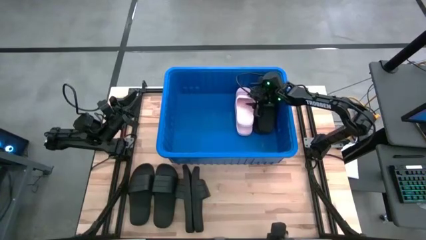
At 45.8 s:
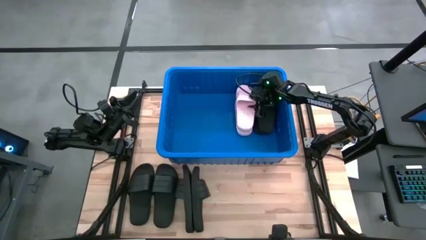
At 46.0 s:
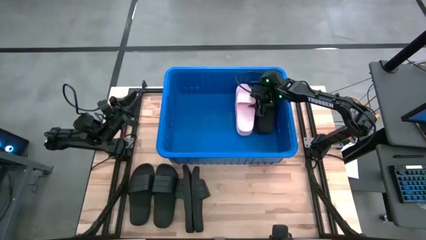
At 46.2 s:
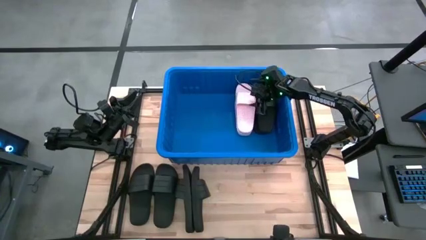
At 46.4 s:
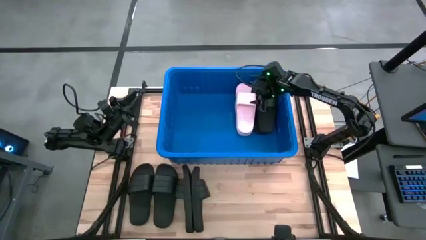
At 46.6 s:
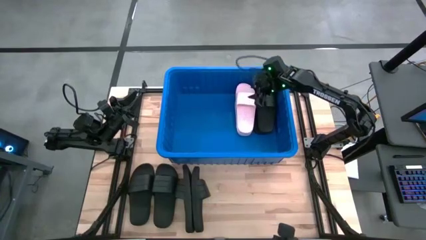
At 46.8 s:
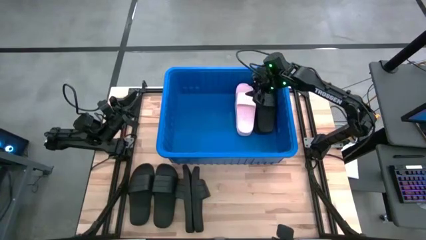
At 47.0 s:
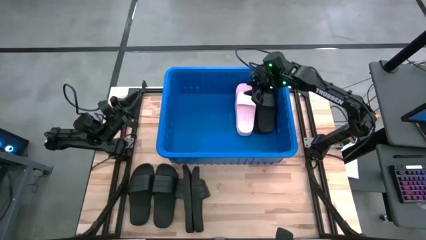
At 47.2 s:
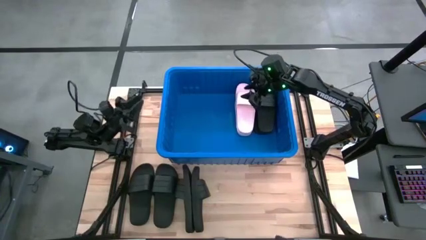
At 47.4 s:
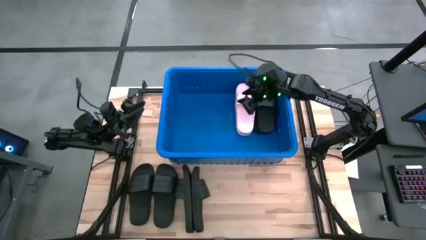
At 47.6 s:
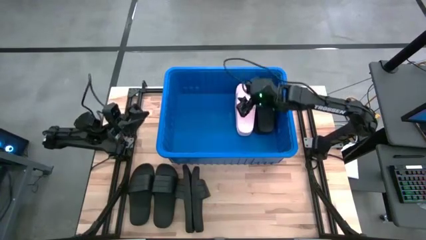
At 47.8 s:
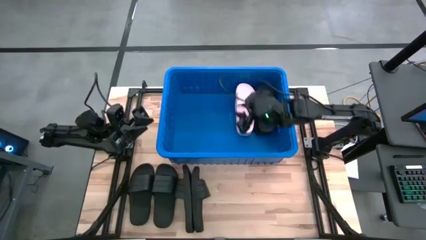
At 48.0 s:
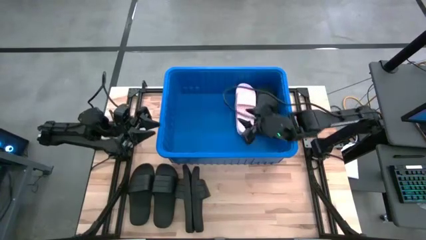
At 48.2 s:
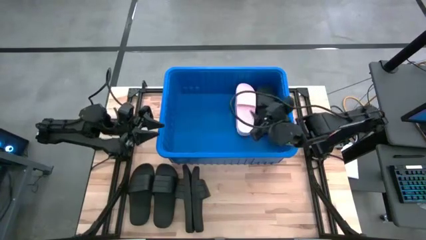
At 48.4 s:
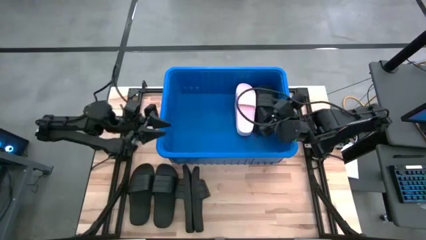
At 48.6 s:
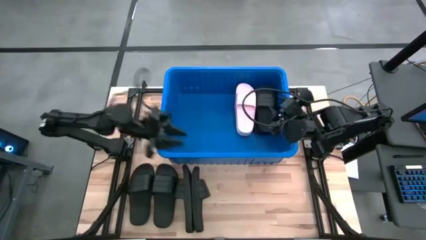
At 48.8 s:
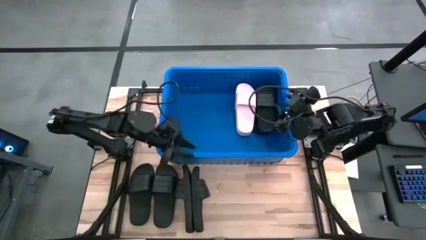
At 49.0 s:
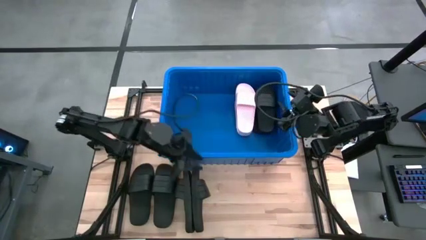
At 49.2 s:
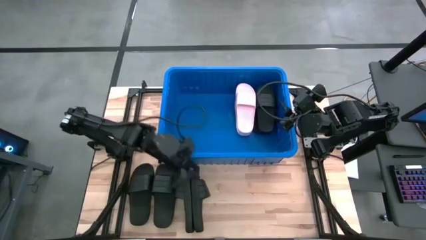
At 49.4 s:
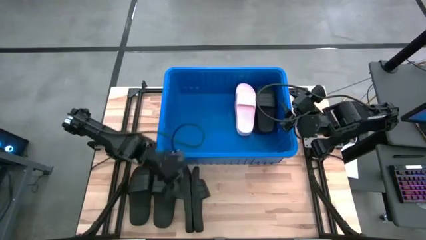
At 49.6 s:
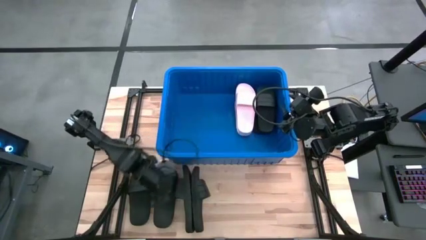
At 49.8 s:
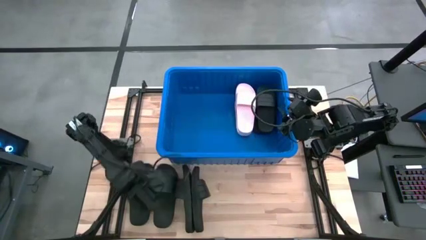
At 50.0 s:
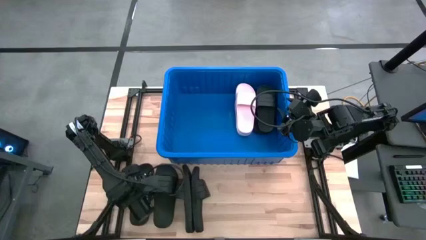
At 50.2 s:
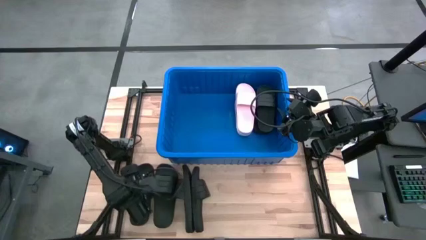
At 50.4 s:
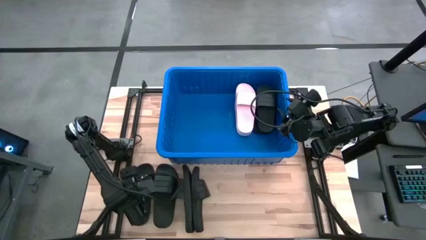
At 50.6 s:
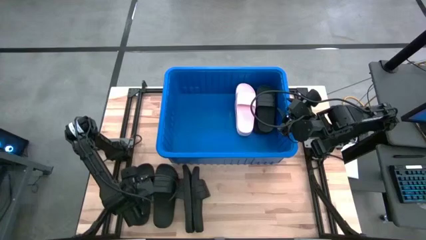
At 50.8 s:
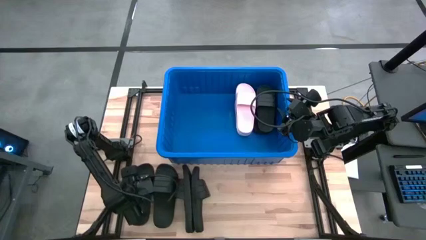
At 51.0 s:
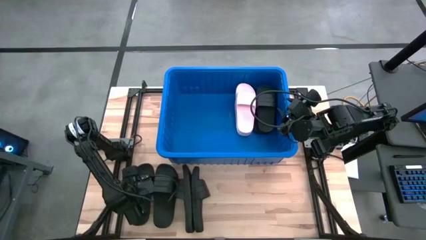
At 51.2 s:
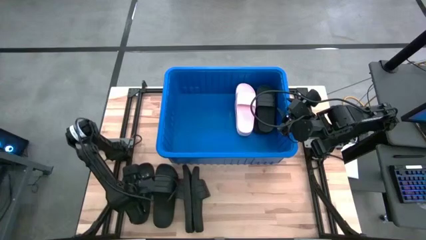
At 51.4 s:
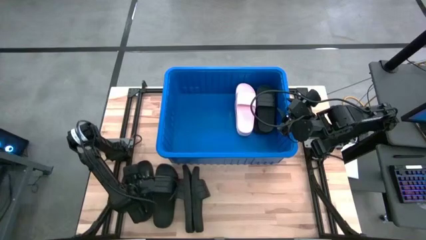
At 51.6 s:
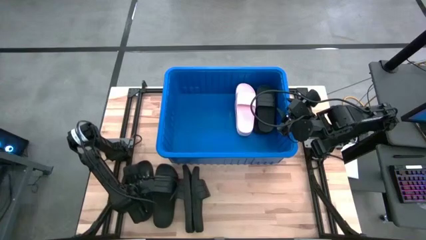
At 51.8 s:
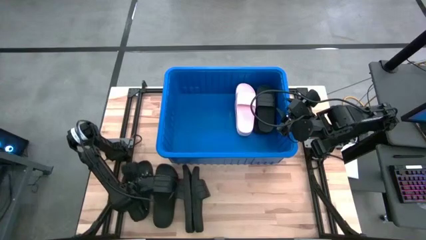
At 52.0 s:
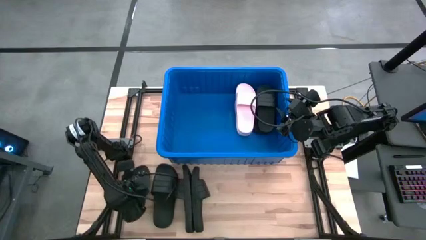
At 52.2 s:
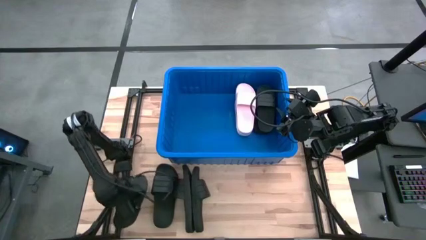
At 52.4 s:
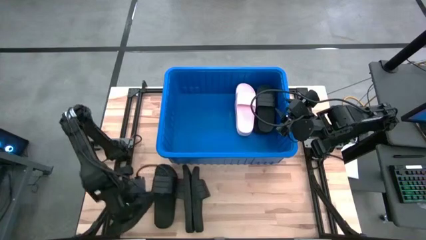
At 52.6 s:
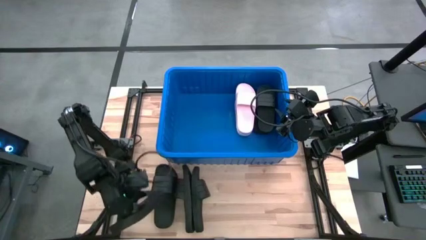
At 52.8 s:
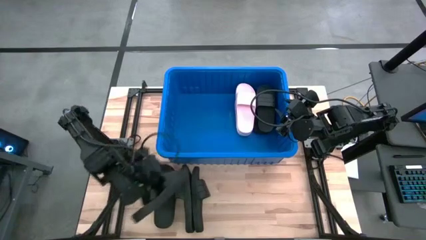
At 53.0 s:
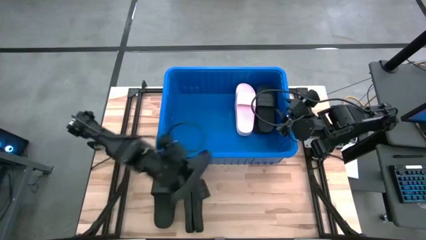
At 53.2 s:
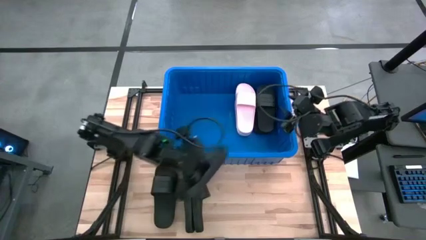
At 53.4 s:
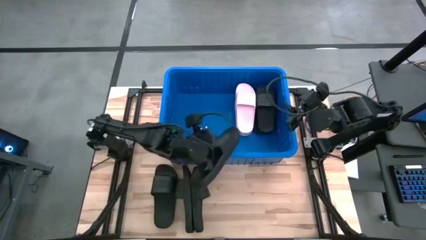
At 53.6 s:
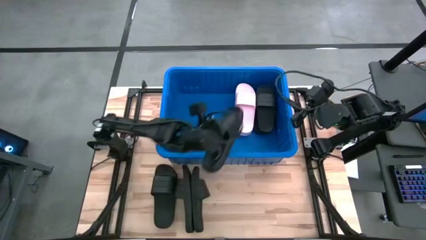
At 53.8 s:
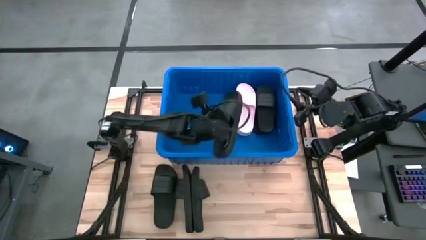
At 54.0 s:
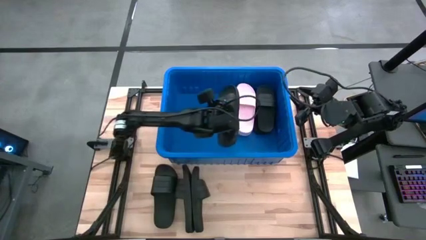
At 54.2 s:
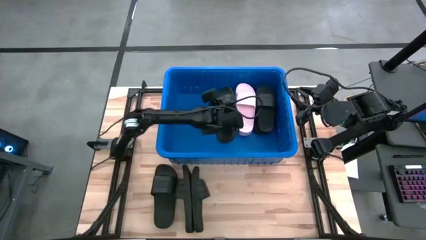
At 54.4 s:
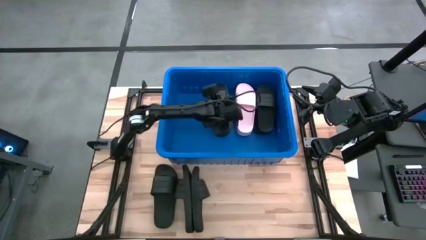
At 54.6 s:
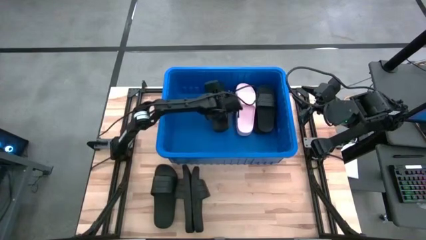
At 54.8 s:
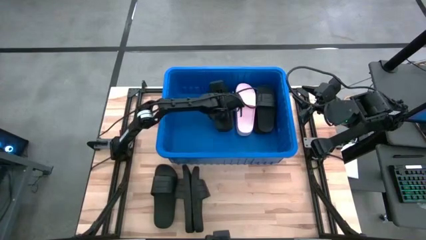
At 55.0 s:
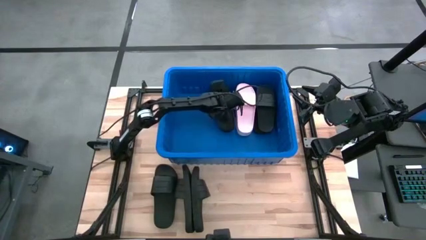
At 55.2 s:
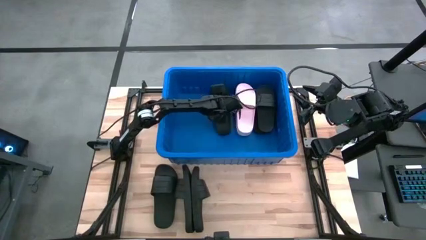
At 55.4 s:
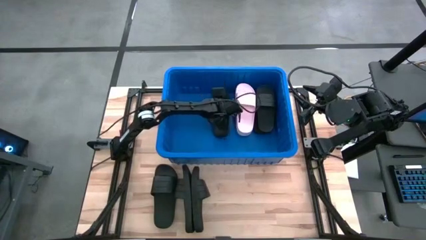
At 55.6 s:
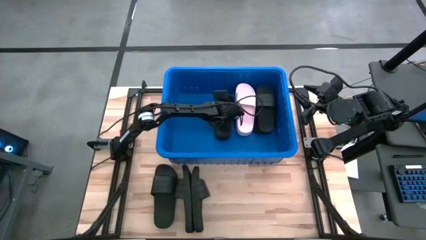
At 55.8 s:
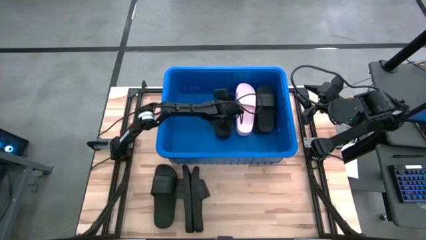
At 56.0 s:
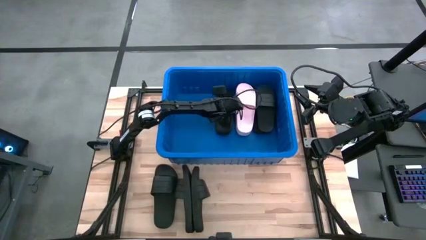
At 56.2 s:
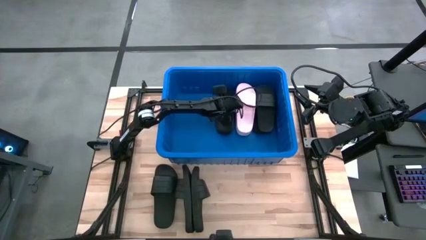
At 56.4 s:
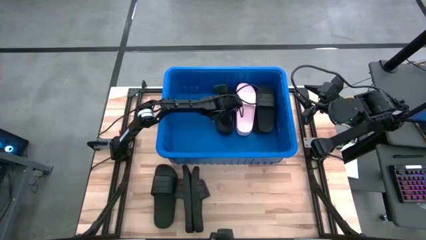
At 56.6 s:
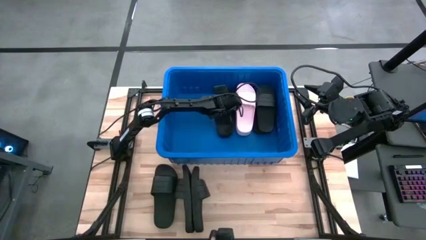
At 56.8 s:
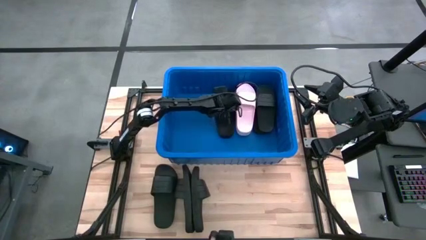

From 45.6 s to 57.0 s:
Task: Pick and place slides into bin
Put the black slide into the blue bin

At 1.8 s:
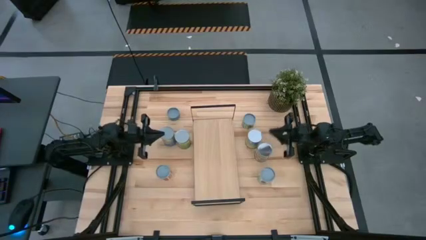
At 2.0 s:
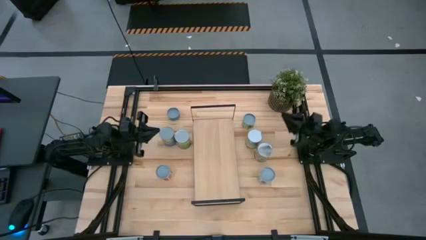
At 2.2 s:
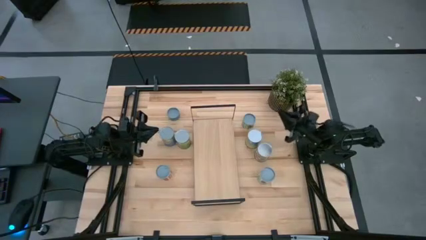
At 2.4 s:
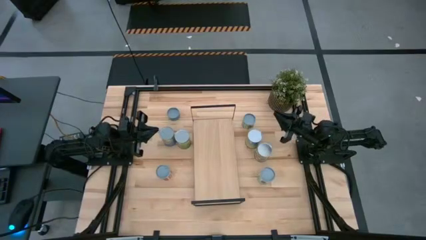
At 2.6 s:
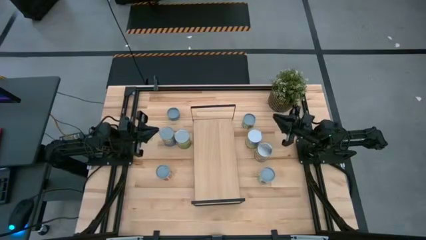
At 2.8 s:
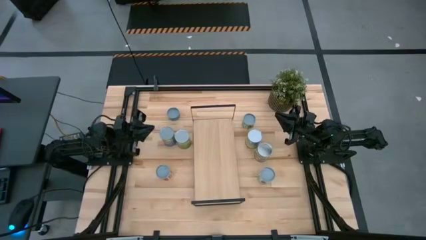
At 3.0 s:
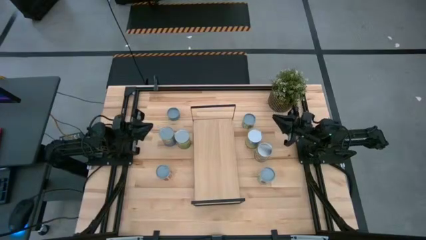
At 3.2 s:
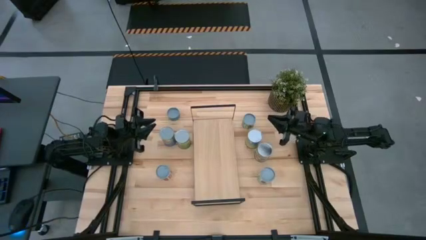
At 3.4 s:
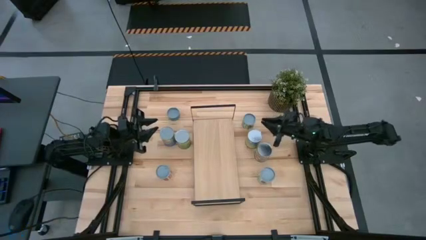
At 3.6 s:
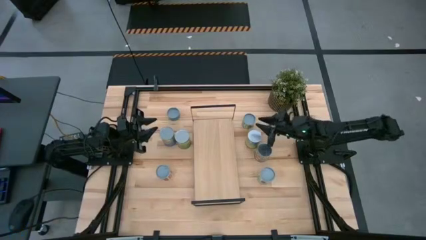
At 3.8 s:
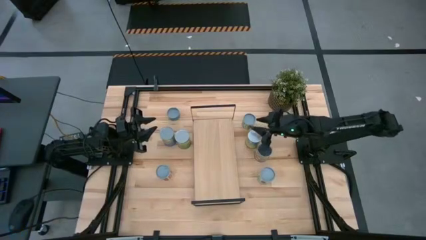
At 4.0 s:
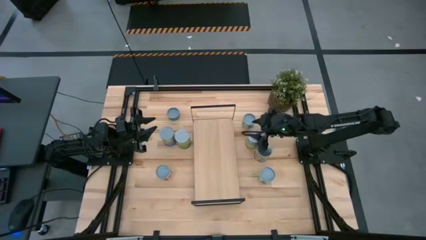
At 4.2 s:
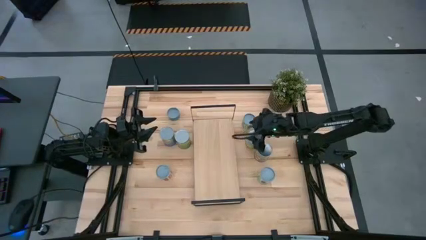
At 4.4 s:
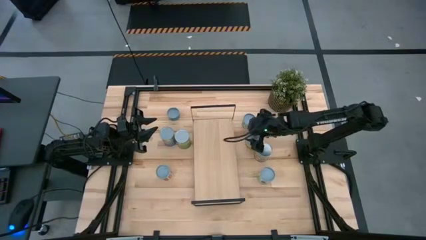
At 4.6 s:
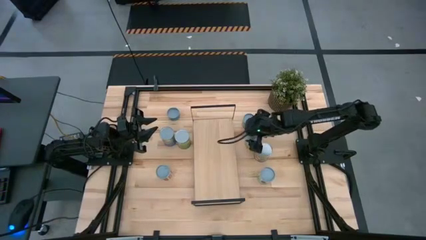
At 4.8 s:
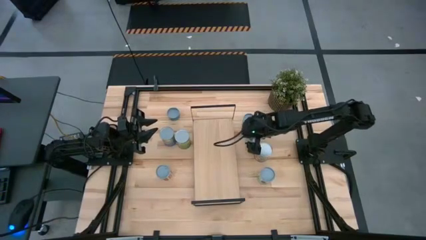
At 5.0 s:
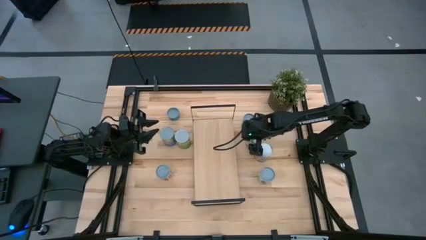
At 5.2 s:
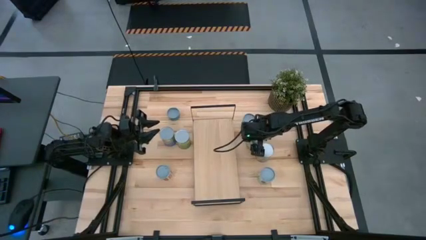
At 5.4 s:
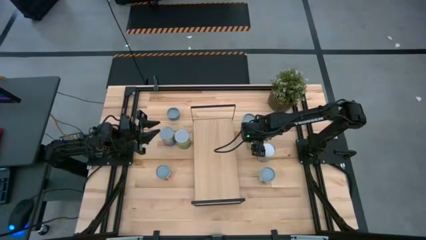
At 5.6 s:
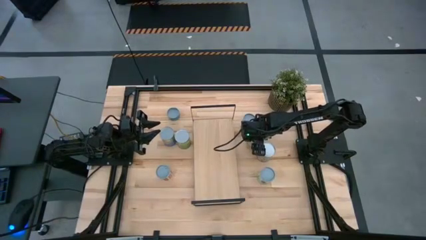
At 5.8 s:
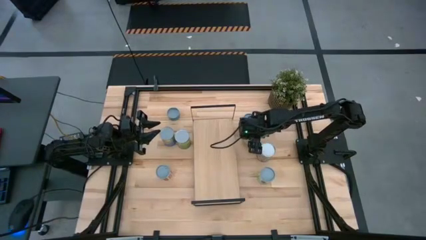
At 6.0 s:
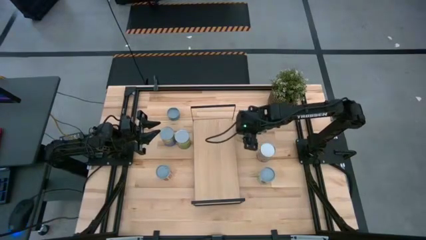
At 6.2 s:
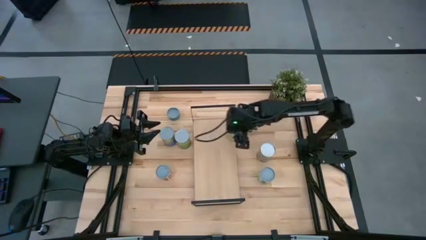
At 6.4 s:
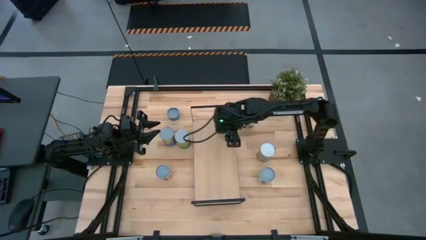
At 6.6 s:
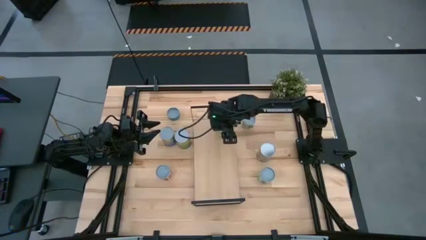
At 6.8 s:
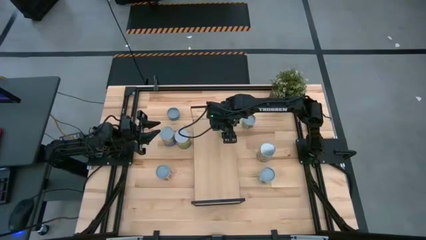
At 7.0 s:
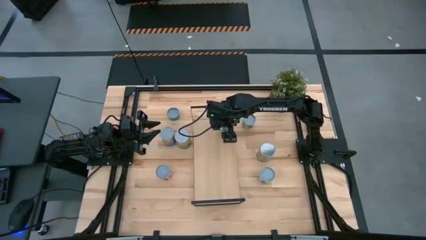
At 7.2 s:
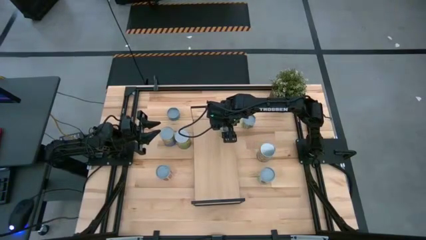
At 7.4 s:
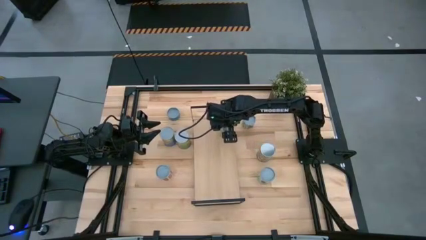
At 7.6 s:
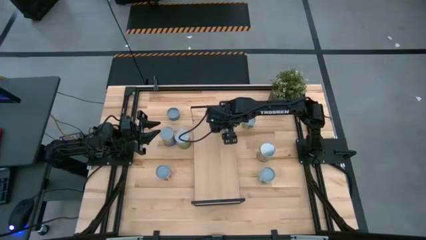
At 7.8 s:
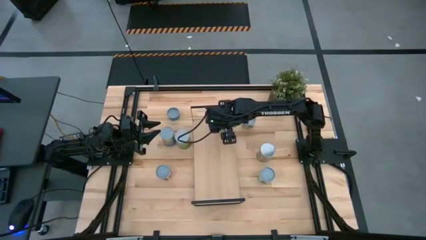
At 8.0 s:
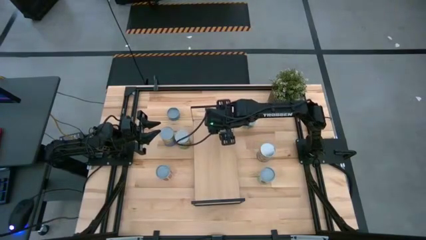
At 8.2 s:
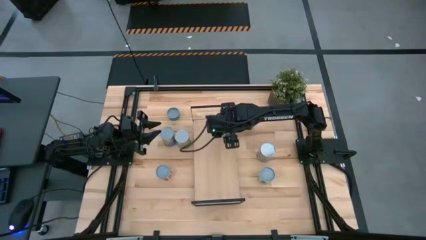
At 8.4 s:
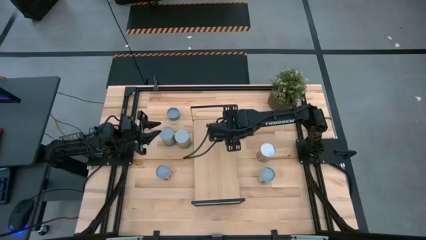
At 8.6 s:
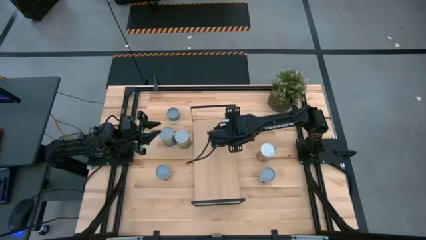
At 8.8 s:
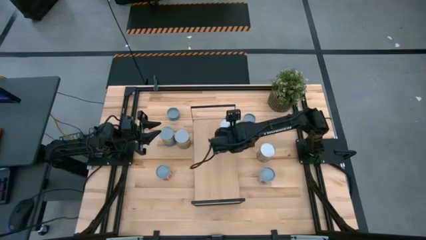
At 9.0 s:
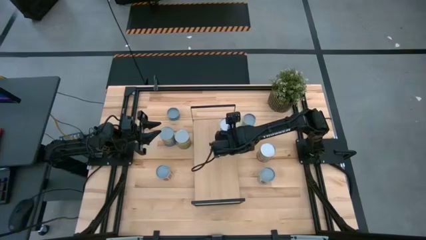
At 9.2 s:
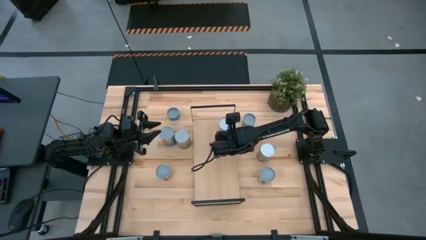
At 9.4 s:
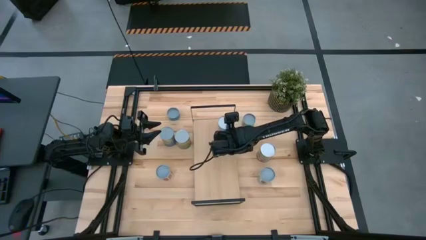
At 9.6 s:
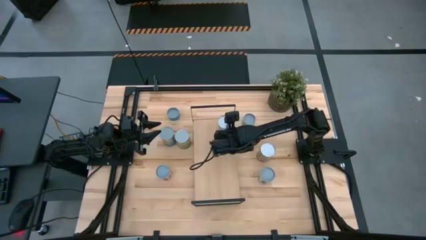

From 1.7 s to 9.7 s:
Task: Pick and place cans onto a shelf
Put the canned carrots on the shelf
